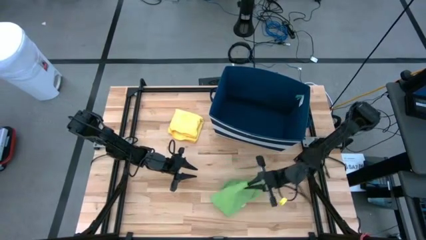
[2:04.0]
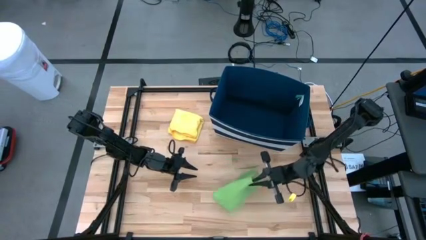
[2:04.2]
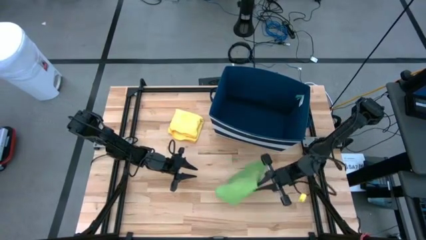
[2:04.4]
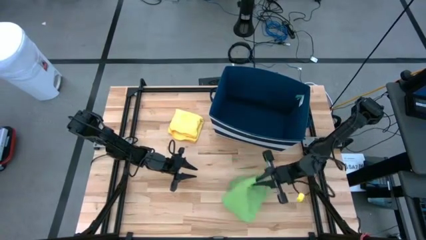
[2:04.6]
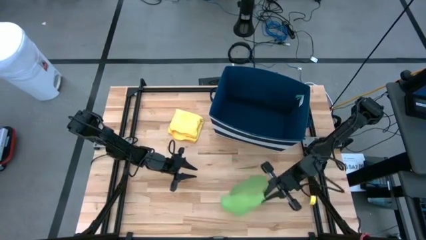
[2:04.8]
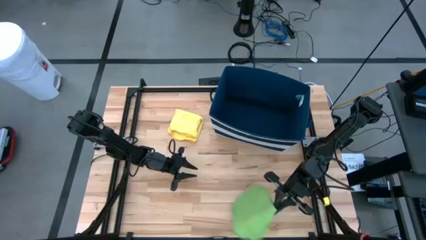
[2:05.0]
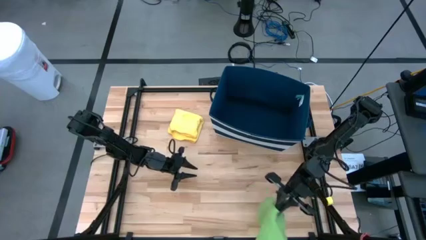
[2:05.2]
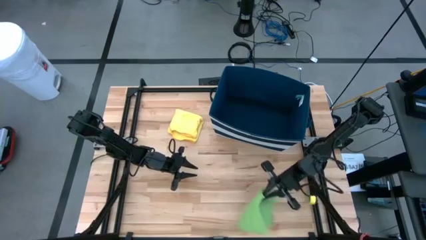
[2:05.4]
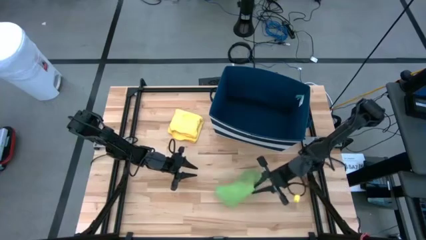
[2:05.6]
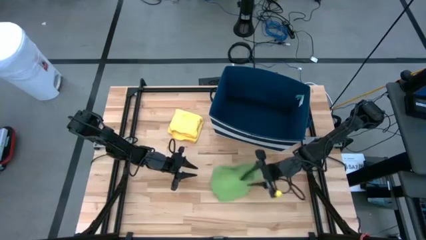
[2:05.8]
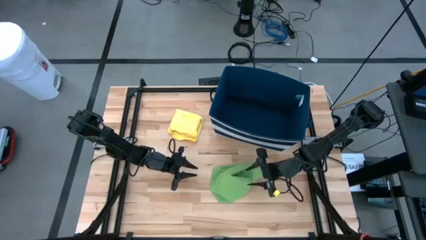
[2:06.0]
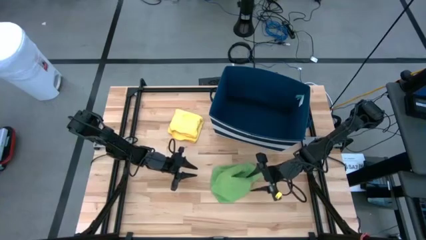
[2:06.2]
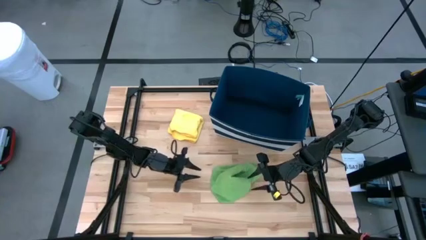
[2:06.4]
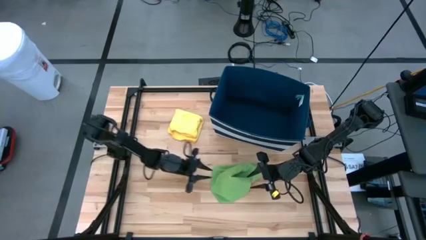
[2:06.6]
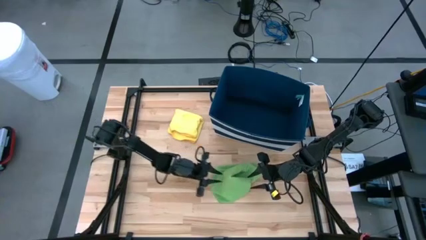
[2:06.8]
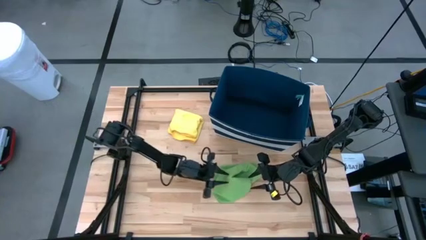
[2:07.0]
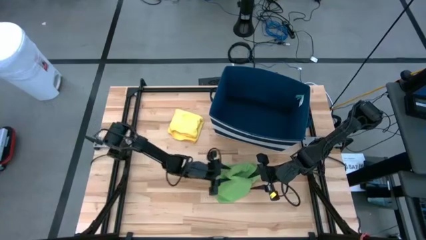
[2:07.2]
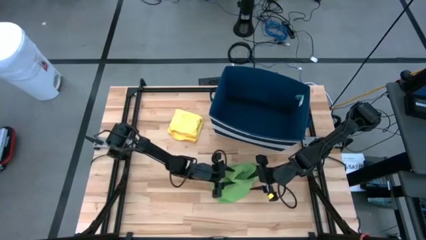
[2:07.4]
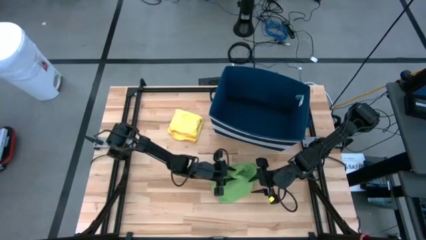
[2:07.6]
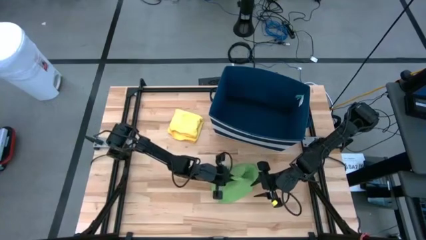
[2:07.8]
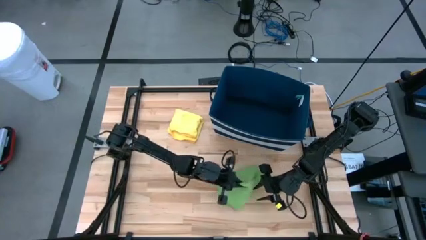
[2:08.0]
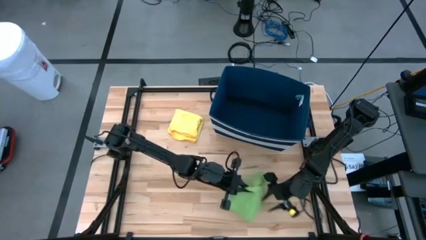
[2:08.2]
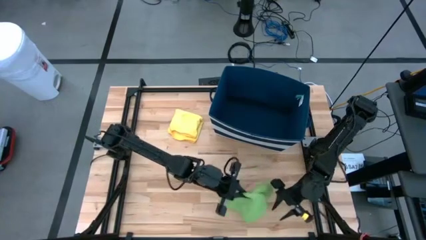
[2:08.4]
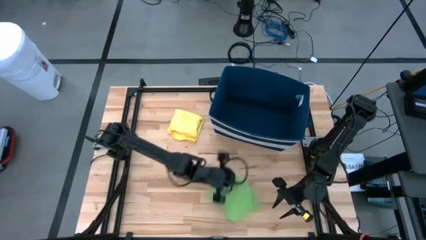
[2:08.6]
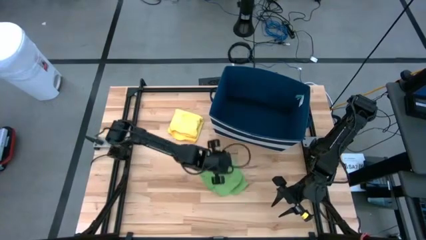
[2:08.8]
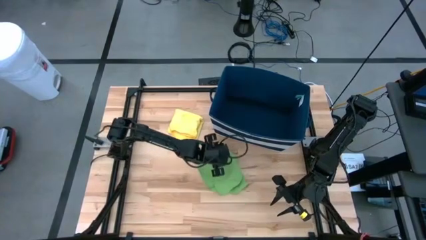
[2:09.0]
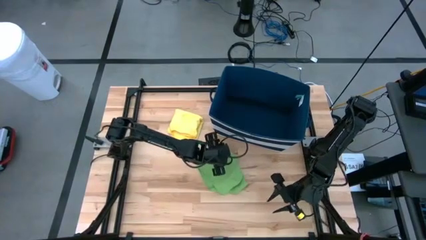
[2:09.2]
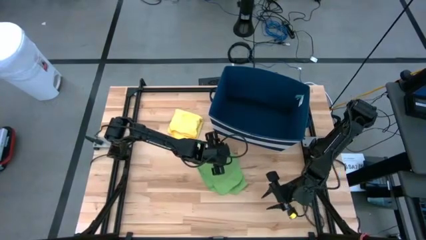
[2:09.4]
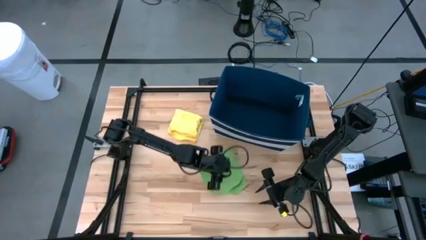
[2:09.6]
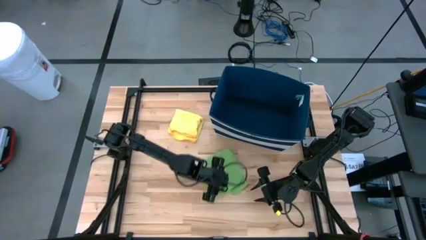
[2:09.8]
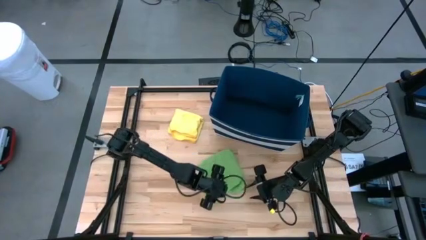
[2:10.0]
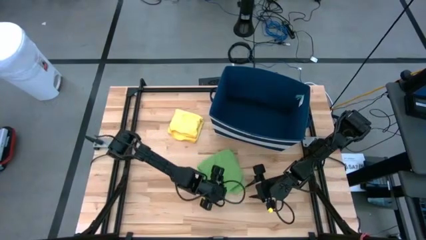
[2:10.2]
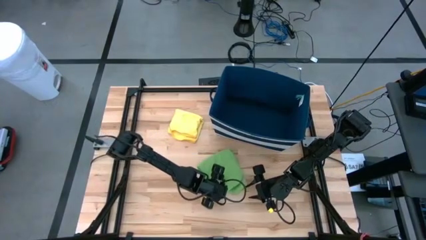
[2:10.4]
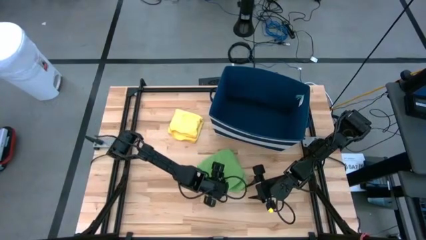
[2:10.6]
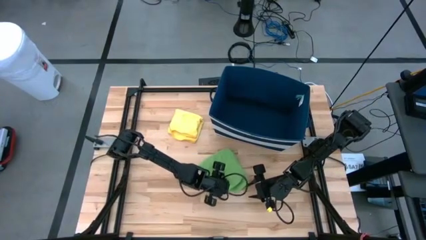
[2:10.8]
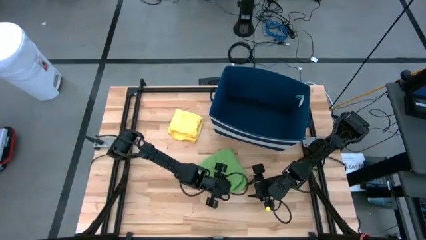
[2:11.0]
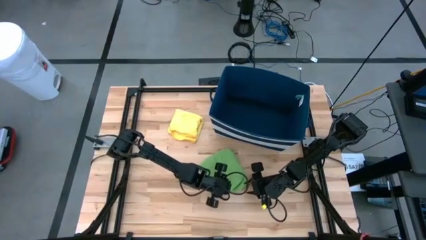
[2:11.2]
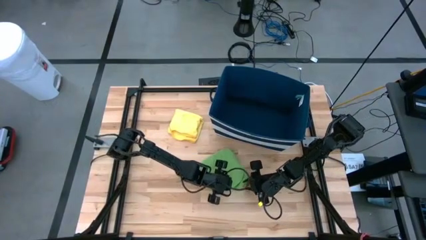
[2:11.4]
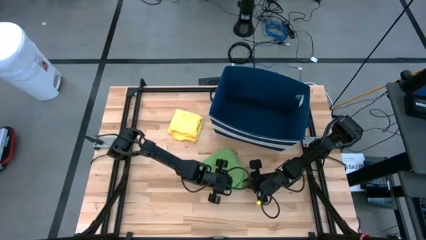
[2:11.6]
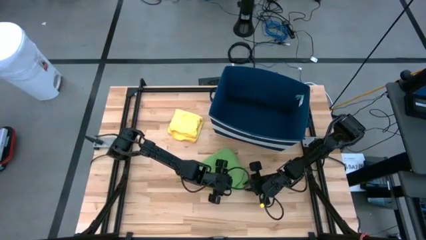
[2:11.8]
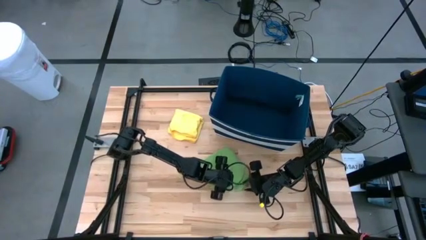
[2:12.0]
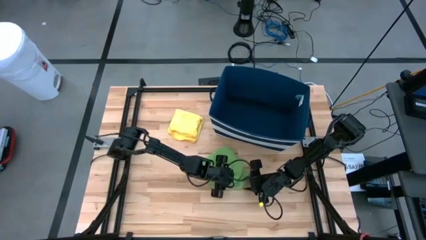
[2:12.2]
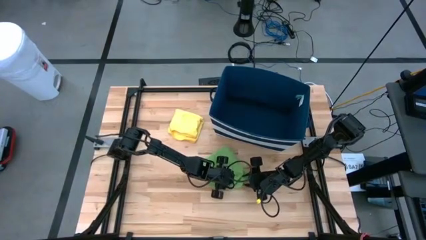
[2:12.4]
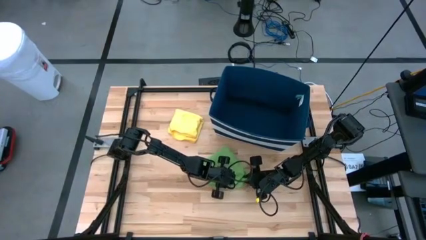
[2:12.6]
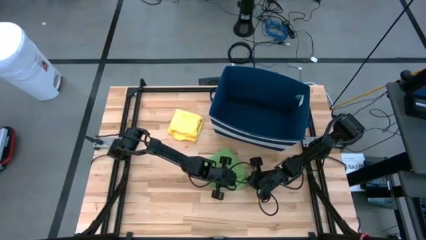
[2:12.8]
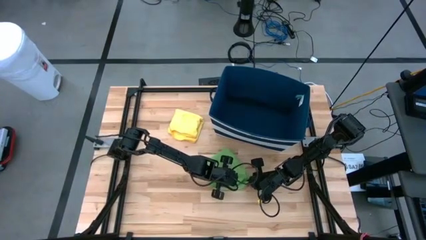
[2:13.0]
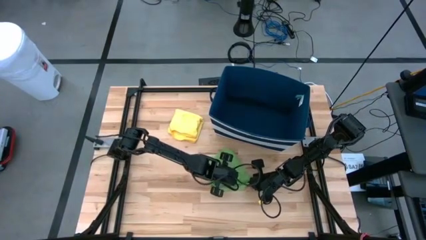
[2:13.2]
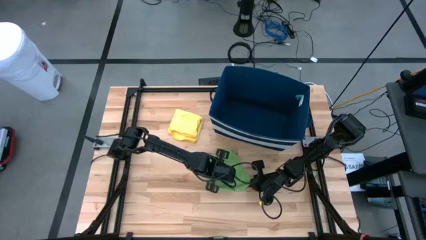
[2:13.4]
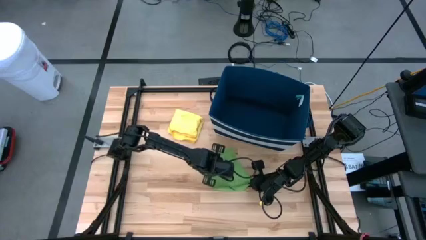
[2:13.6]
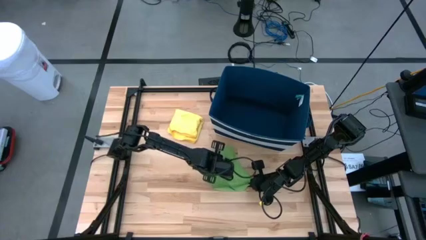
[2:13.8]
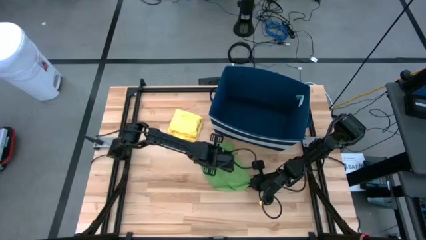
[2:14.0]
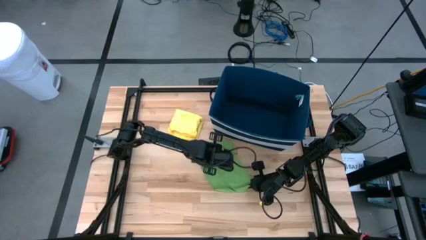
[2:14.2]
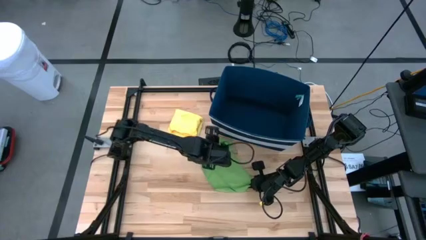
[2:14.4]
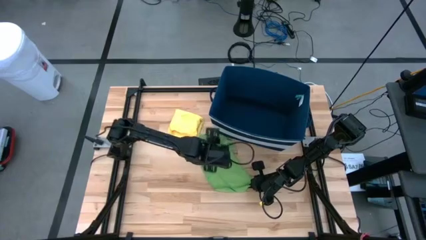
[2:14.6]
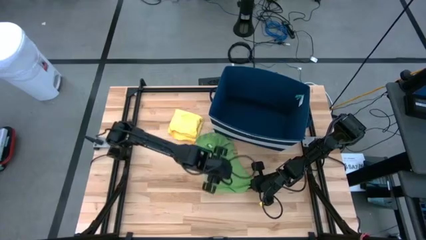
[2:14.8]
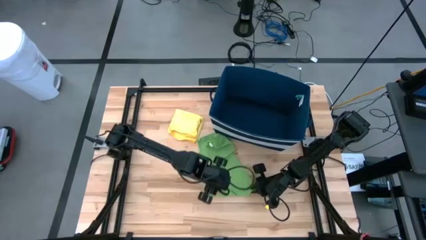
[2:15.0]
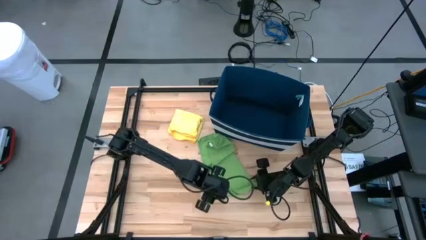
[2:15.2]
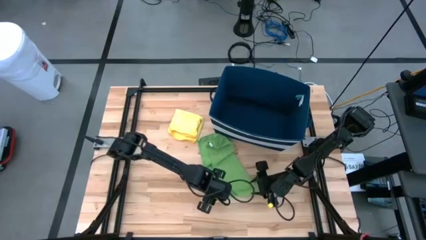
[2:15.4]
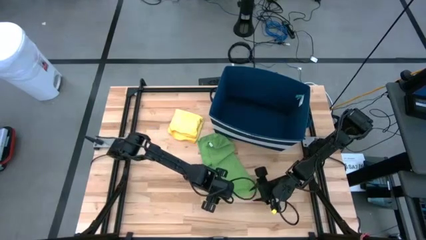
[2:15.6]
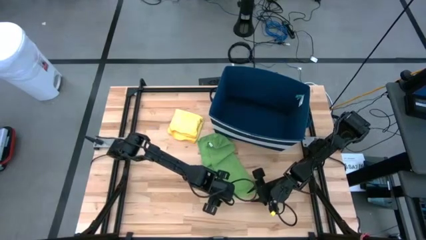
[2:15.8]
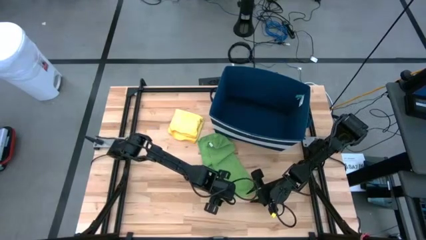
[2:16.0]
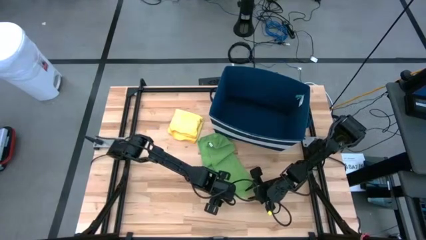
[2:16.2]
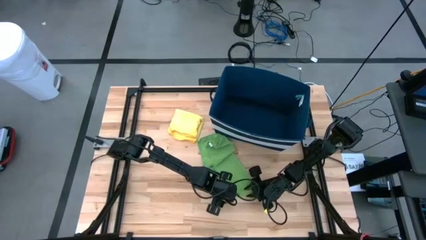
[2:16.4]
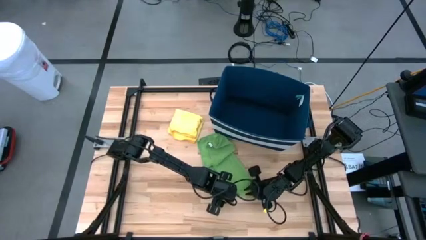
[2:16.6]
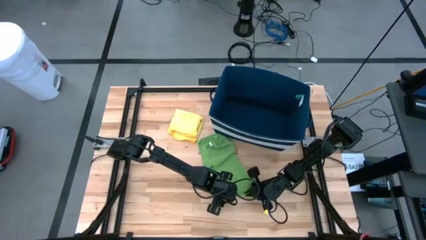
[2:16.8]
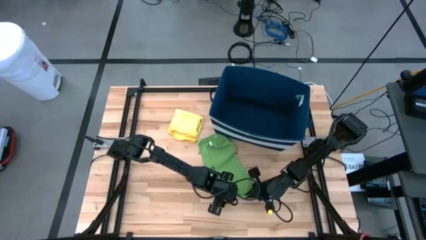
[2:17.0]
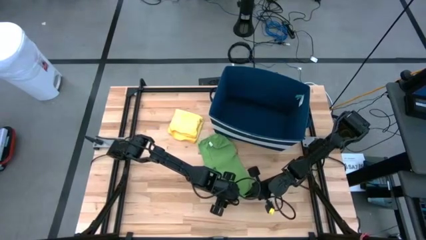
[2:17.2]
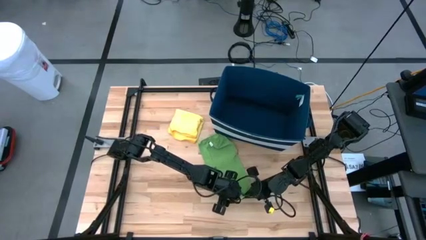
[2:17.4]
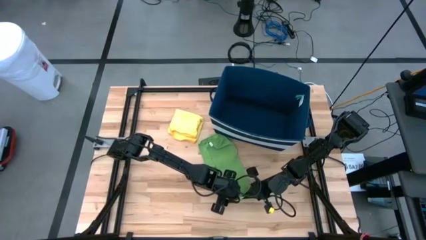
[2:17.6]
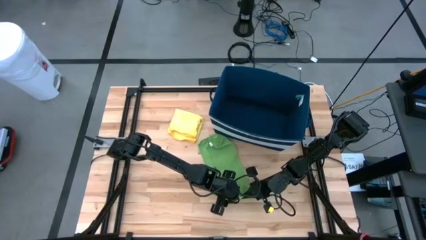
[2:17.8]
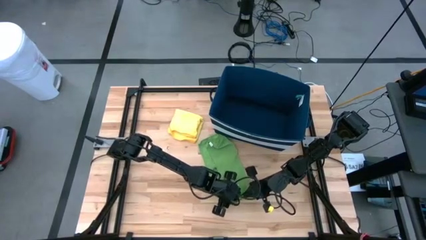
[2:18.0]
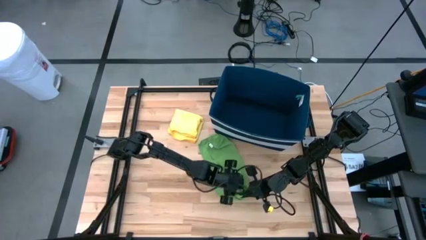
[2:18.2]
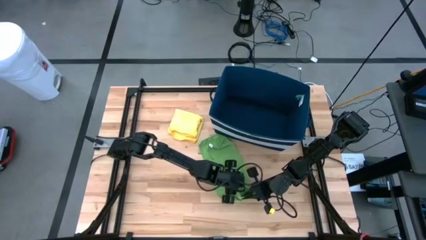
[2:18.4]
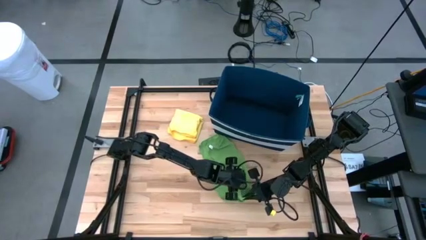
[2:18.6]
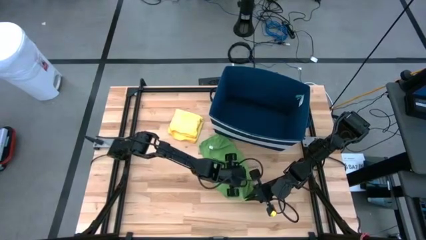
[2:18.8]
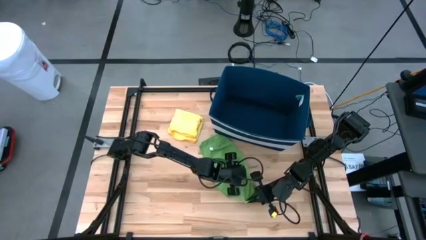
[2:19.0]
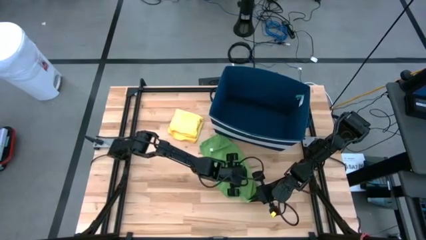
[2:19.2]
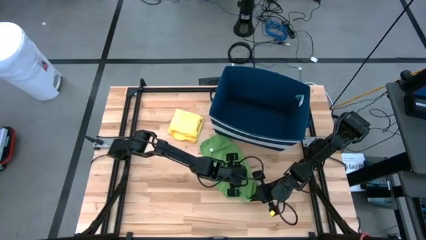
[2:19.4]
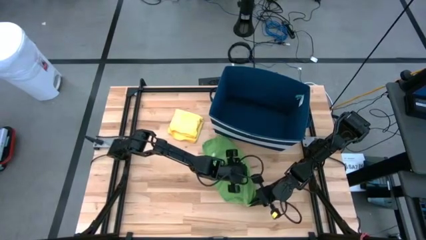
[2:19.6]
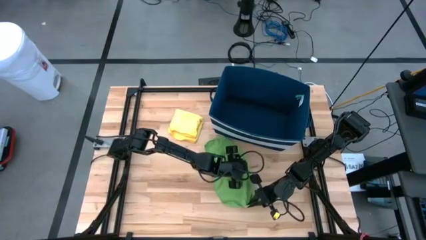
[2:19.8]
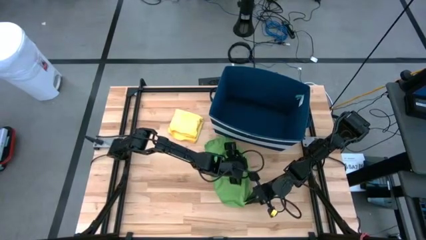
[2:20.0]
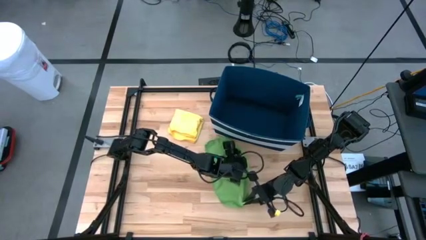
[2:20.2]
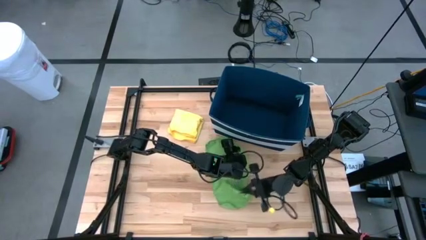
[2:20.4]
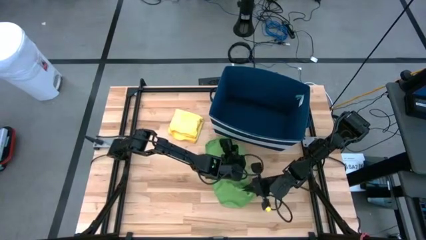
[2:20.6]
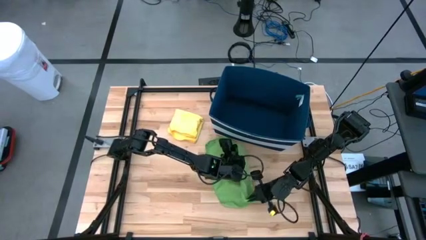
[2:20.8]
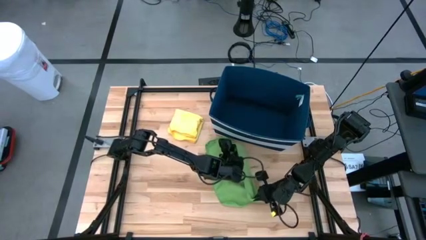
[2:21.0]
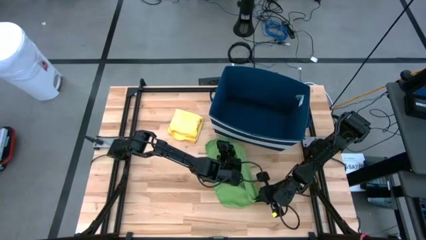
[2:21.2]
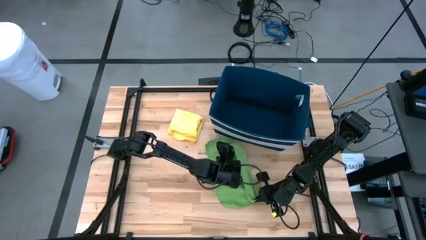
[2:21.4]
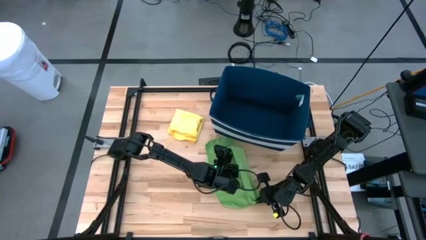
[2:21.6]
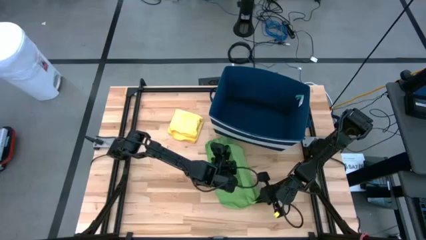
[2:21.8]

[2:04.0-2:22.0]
Task: Fold towel
Fold the green towel
